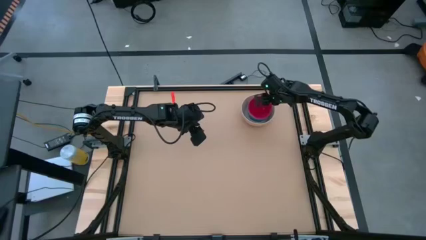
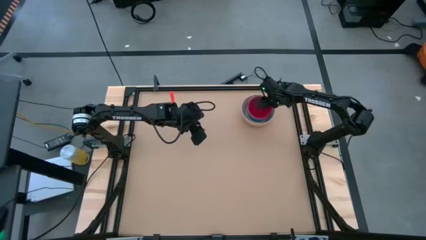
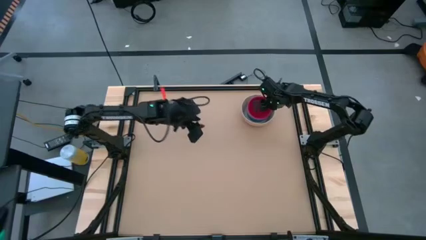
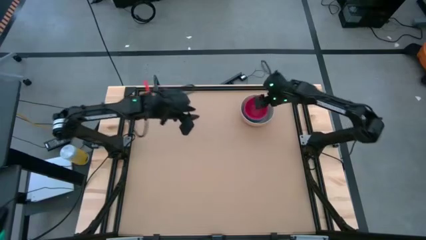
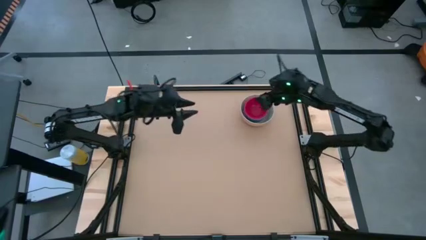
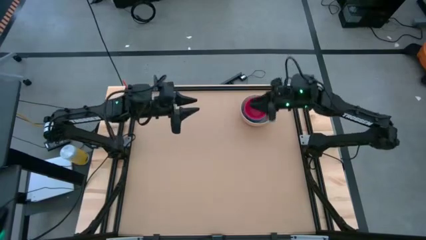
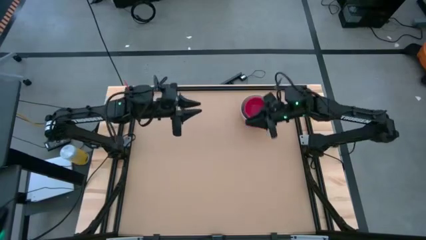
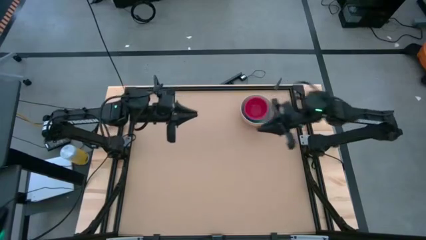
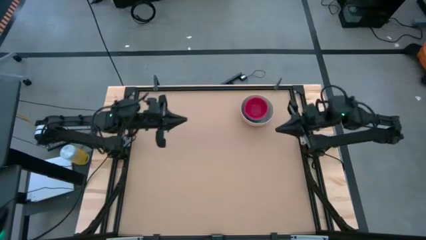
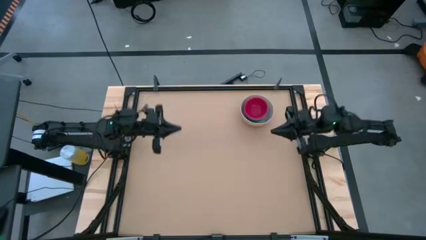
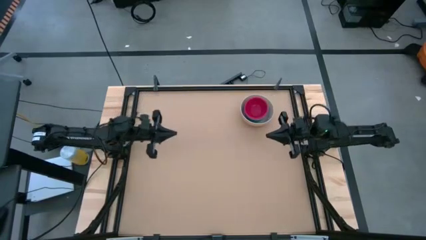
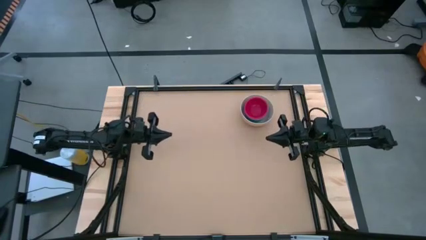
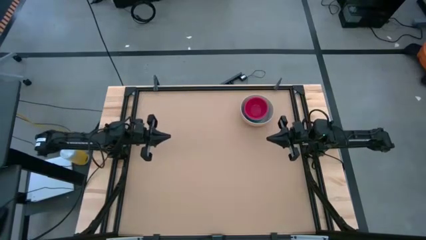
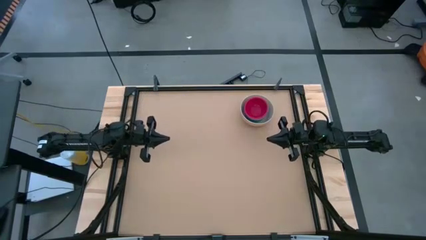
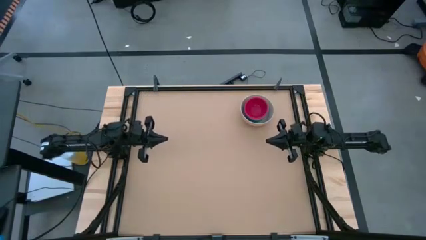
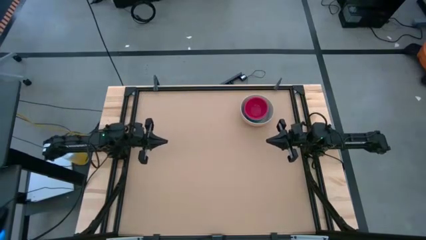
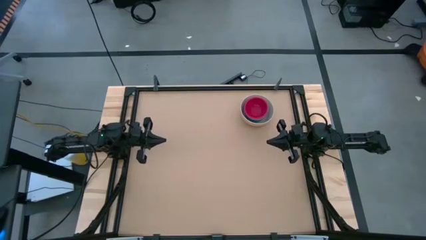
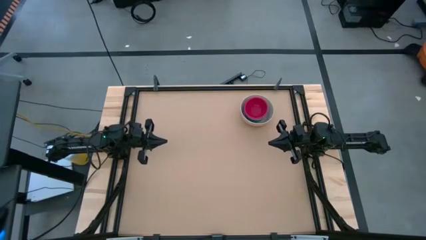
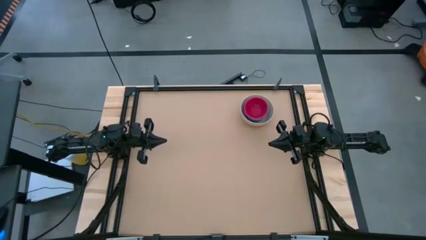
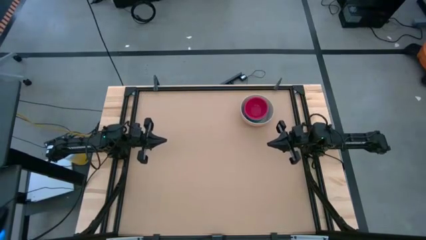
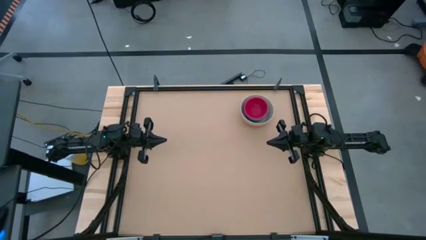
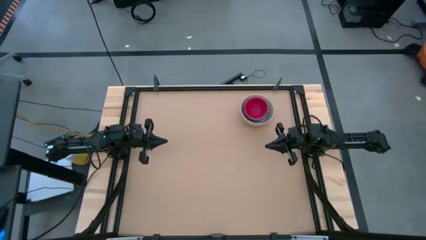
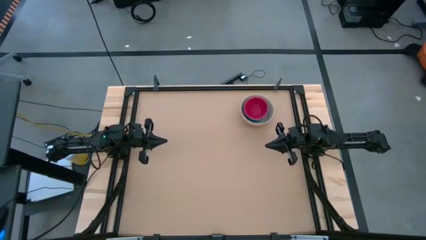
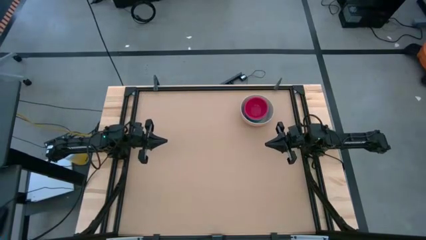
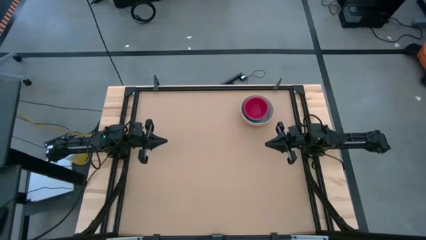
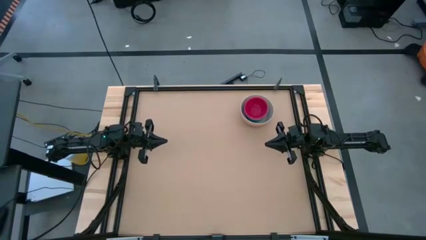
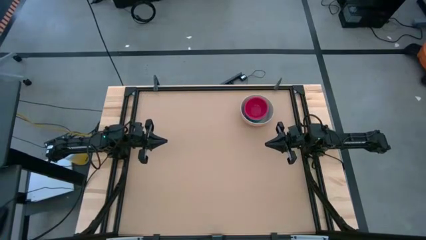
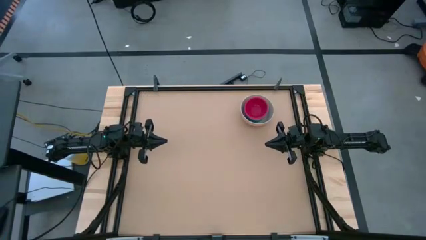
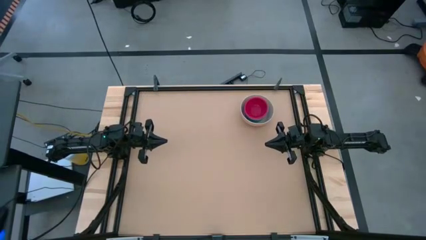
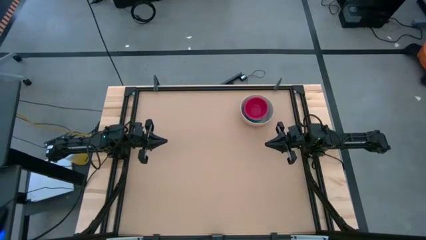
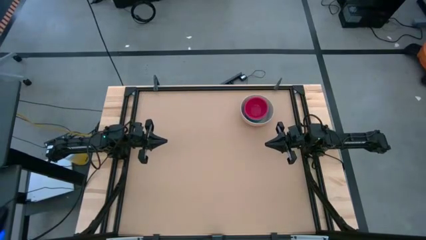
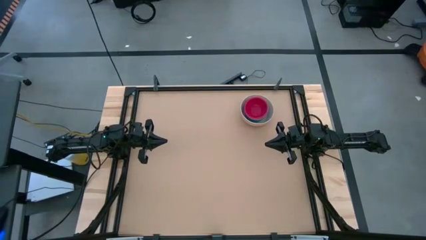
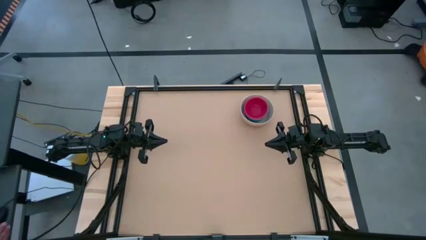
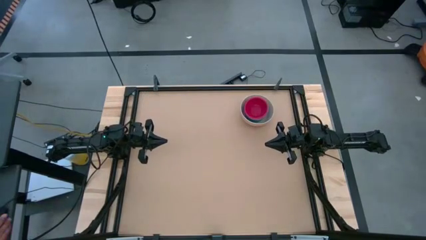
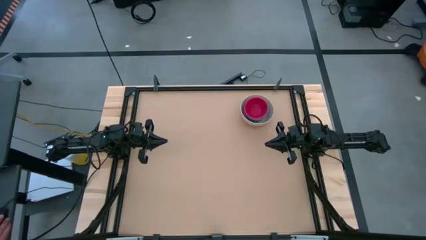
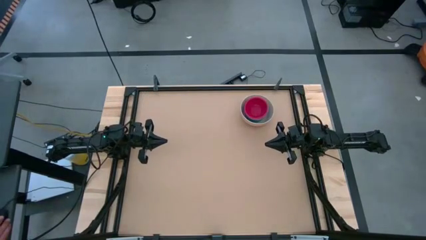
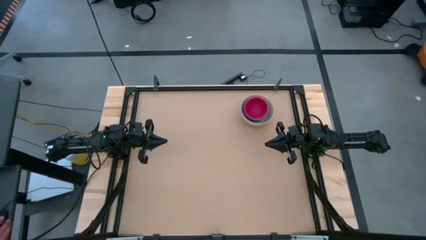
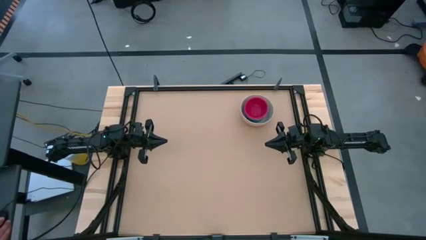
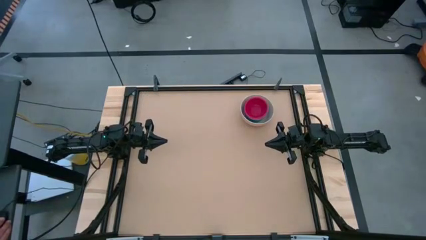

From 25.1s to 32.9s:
Return to Home Position
